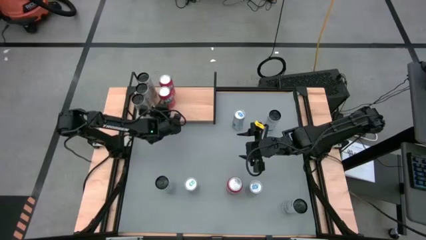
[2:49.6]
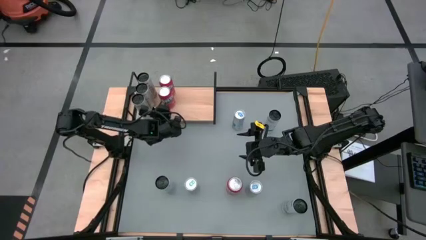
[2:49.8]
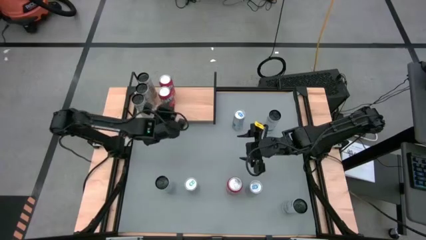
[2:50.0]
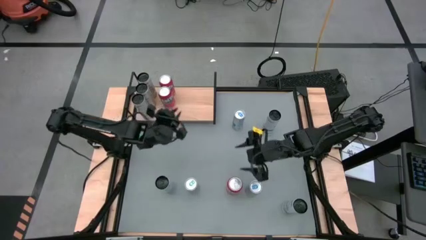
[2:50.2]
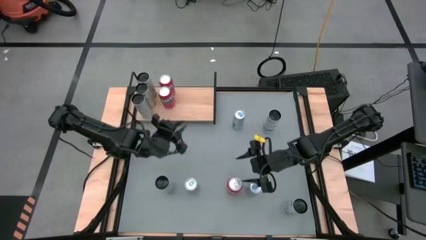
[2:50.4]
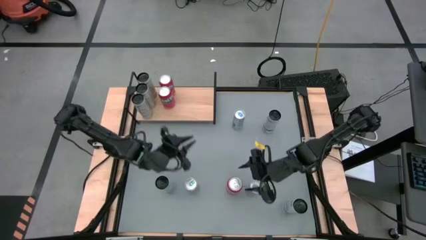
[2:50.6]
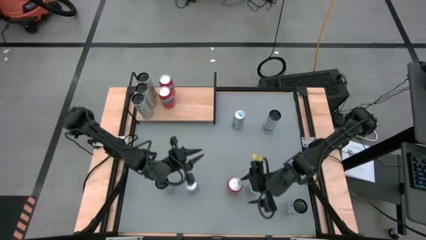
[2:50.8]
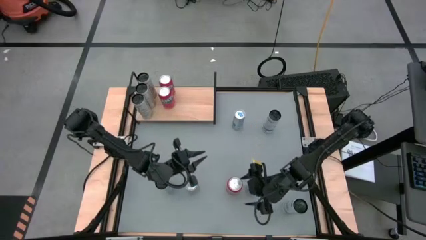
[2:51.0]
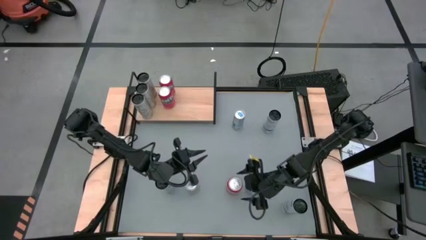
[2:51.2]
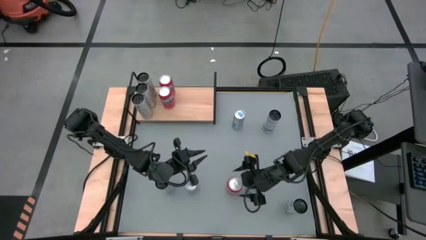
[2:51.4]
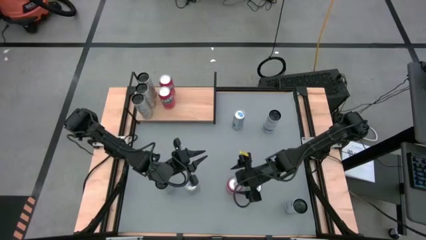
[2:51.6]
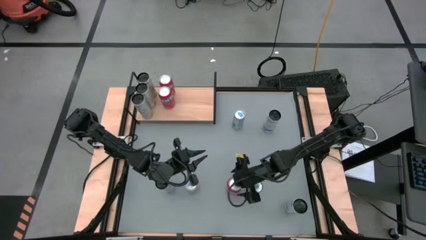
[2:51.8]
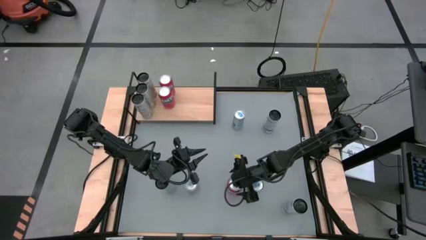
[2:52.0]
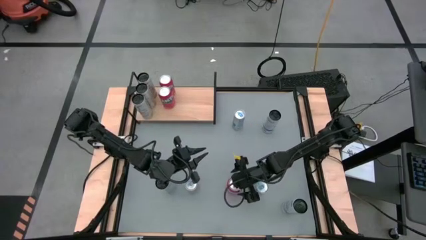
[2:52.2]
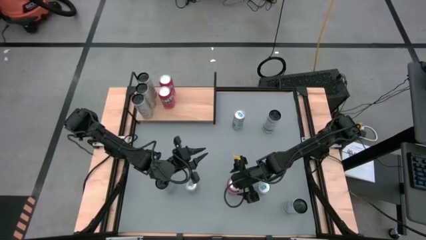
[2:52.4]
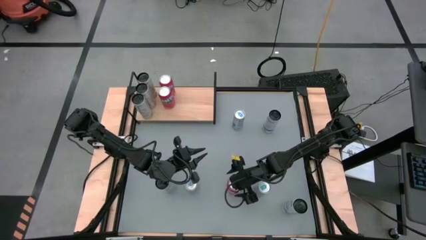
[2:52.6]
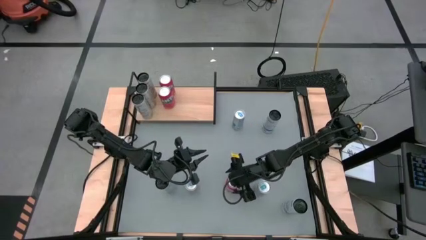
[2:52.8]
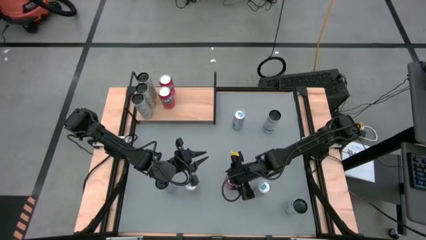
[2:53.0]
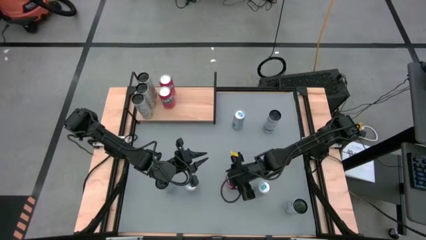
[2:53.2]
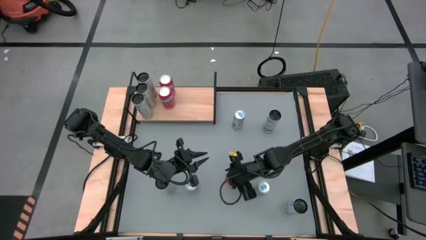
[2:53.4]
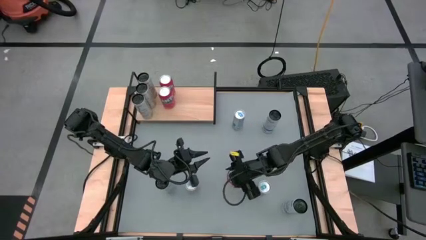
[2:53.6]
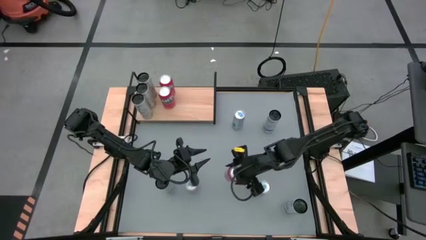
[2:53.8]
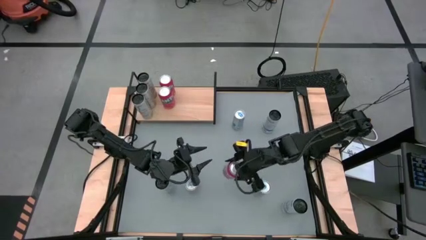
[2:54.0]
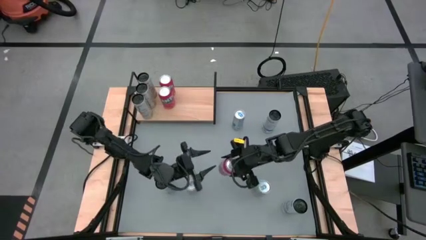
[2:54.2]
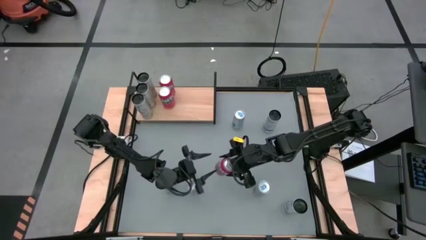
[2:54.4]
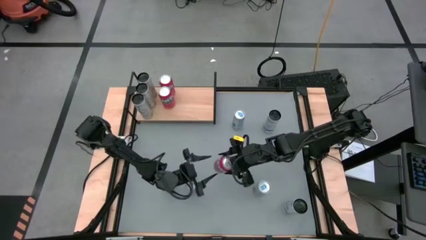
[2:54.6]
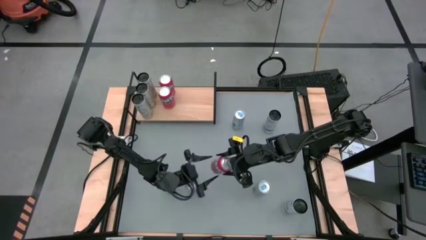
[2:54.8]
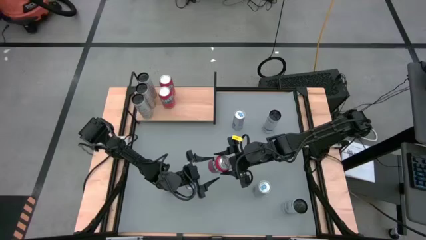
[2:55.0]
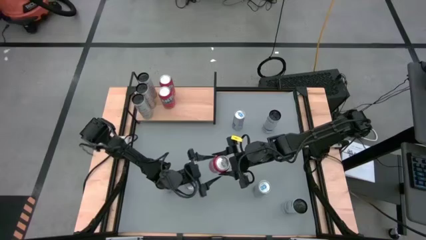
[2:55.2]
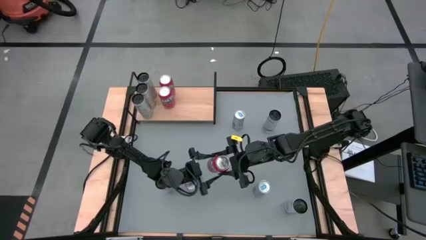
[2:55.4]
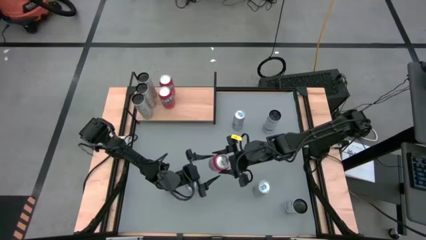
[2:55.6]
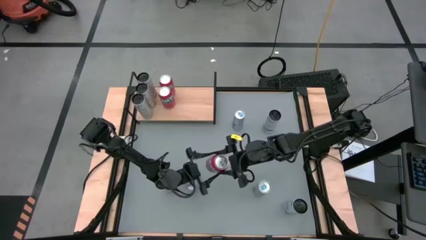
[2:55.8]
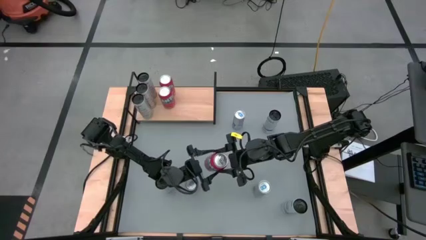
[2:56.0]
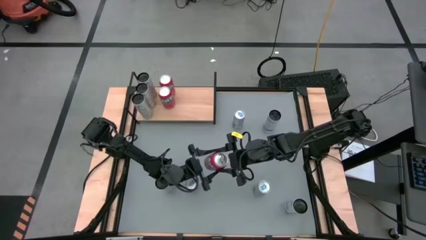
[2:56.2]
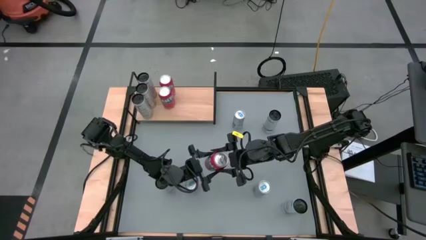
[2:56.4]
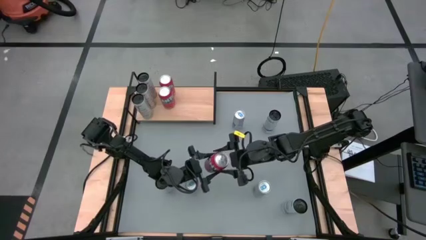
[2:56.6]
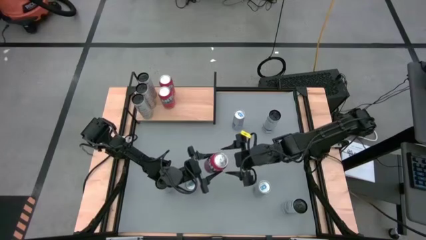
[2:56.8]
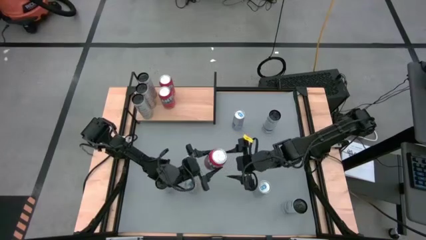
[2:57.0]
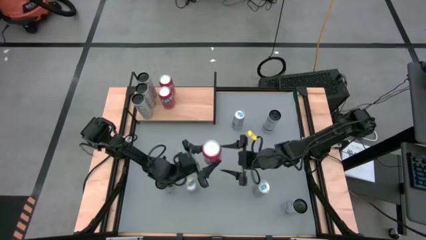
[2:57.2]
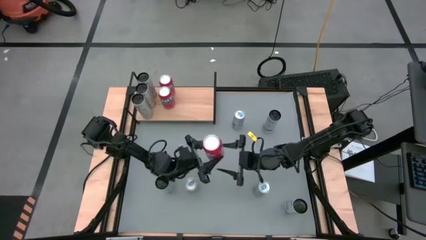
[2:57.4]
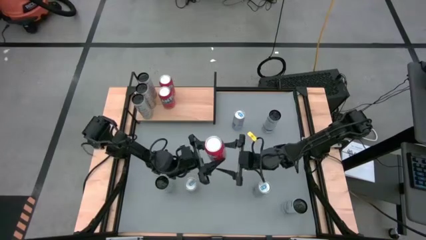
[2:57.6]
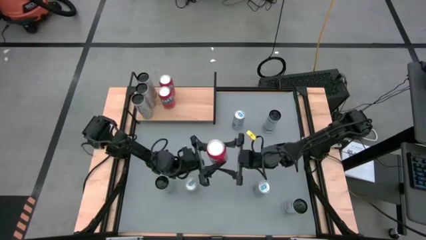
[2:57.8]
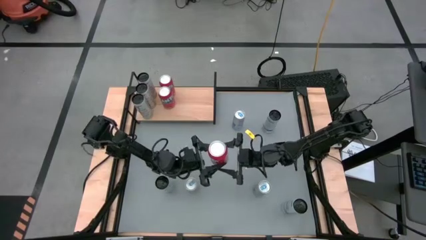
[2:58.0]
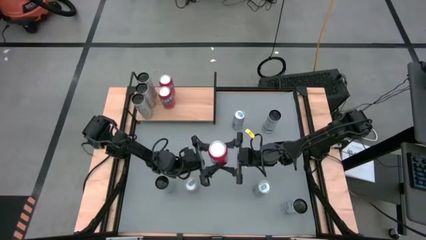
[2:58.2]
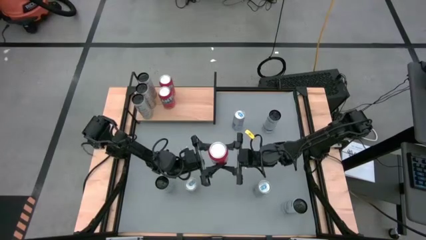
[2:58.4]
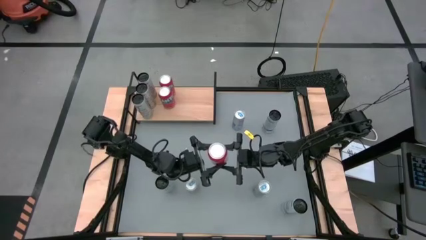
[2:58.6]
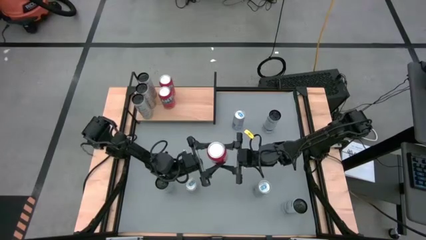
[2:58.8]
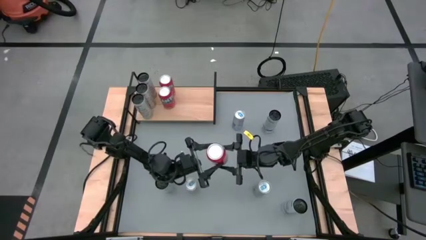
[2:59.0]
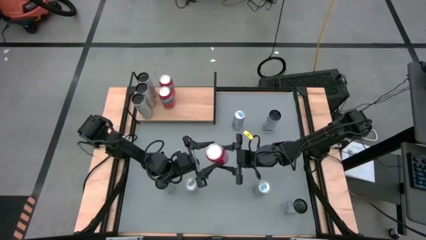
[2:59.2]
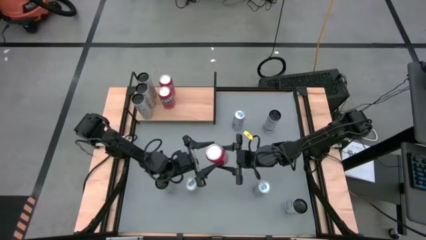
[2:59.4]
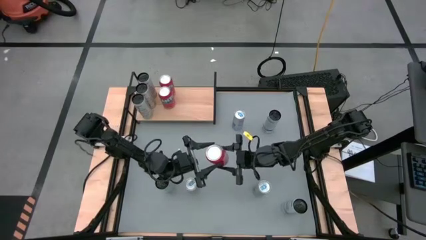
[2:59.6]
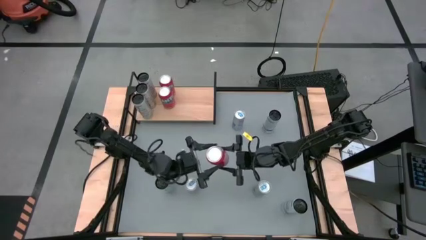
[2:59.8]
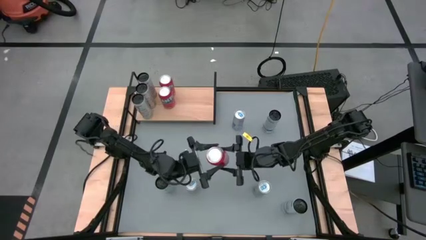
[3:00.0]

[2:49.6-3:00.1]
Task: Place canned beverage on shelf
Put the red soda can on the shelf aligned with the other red soda can

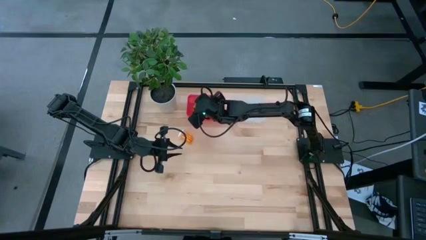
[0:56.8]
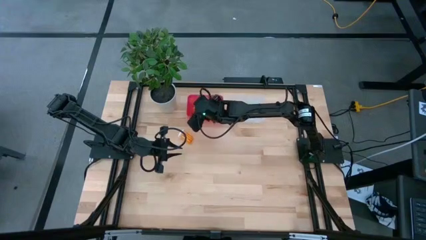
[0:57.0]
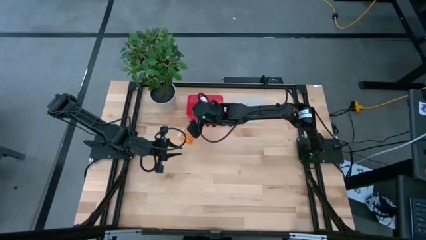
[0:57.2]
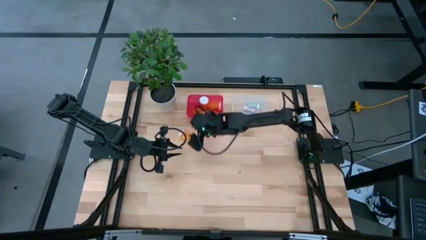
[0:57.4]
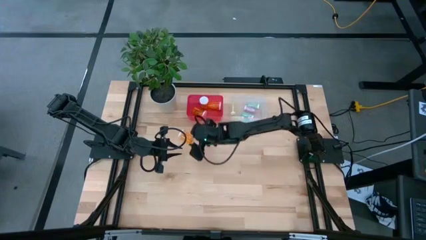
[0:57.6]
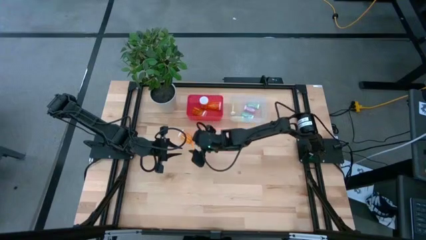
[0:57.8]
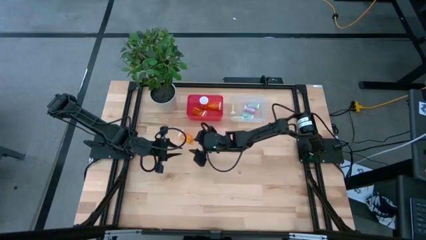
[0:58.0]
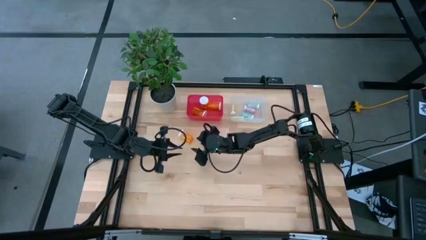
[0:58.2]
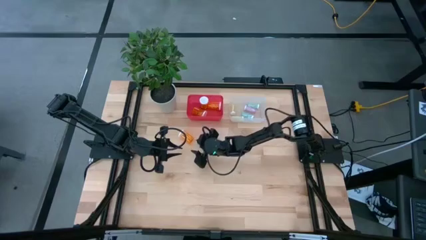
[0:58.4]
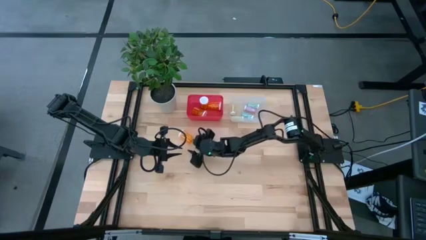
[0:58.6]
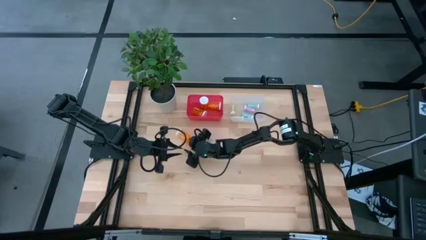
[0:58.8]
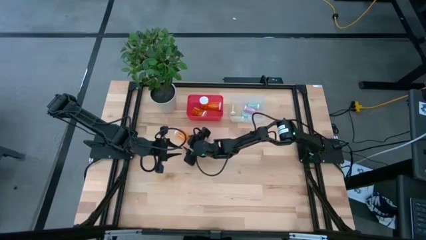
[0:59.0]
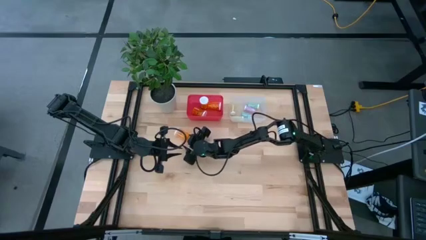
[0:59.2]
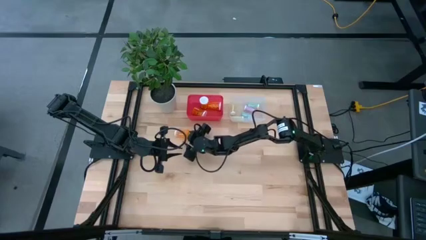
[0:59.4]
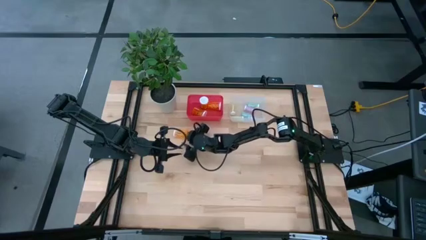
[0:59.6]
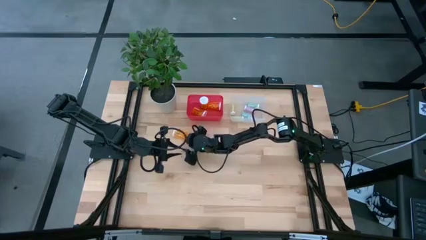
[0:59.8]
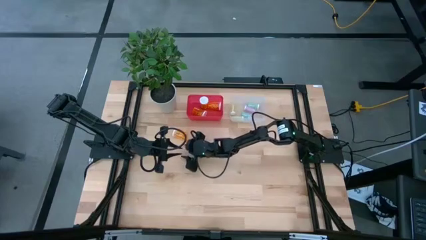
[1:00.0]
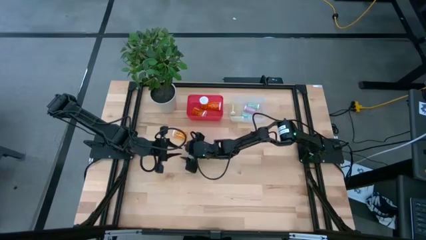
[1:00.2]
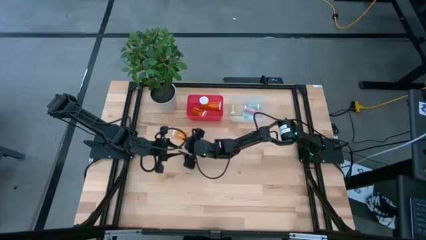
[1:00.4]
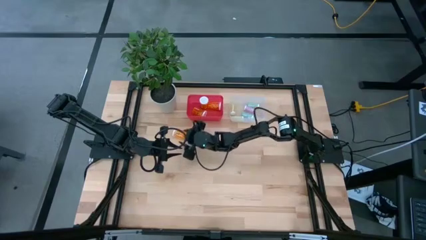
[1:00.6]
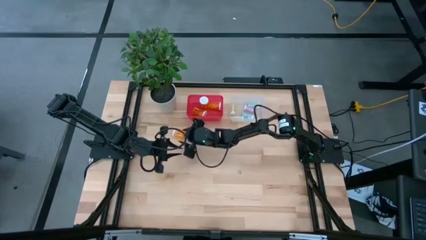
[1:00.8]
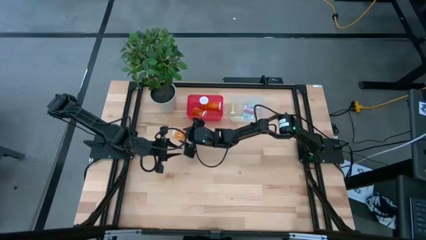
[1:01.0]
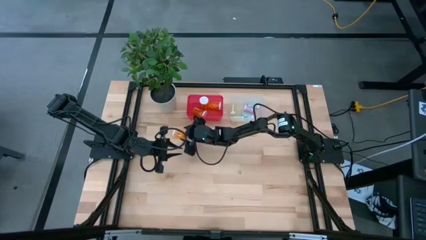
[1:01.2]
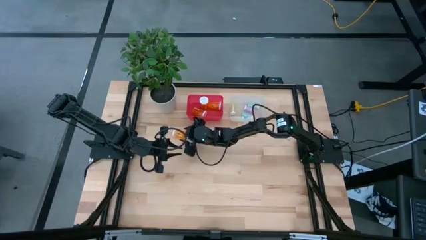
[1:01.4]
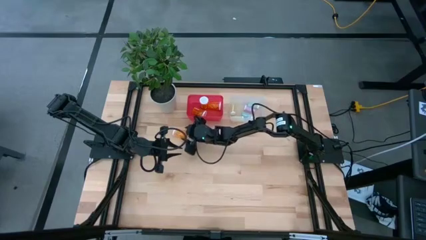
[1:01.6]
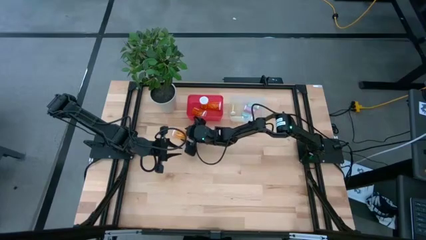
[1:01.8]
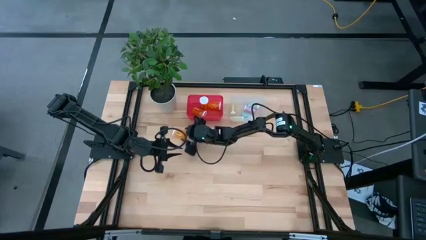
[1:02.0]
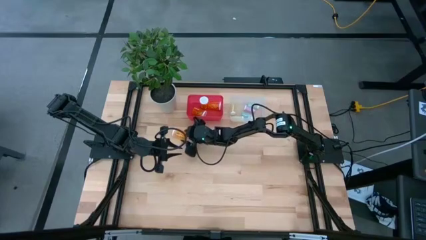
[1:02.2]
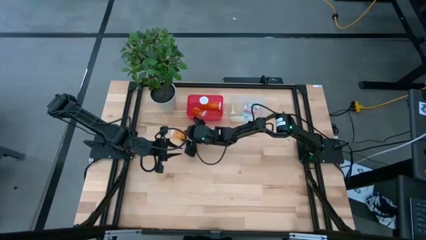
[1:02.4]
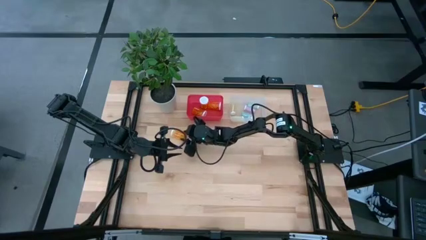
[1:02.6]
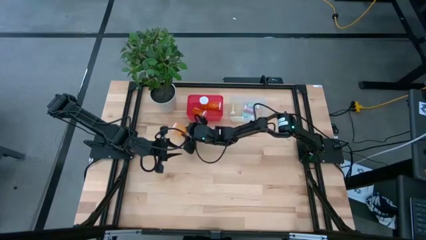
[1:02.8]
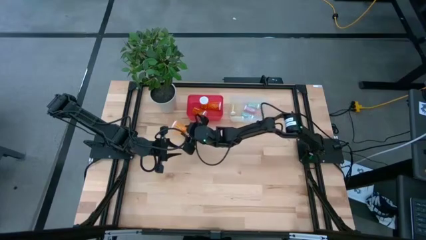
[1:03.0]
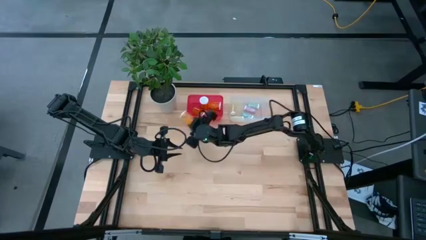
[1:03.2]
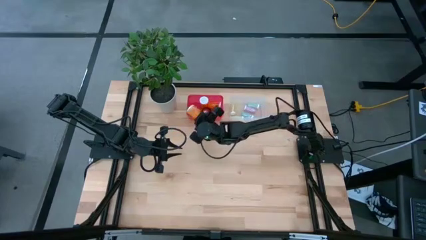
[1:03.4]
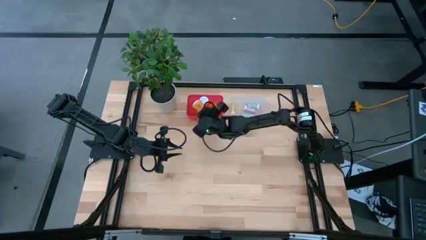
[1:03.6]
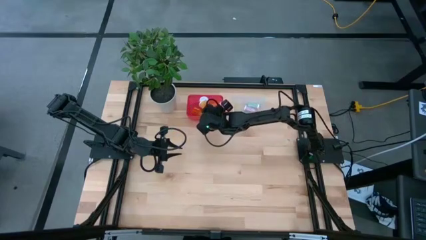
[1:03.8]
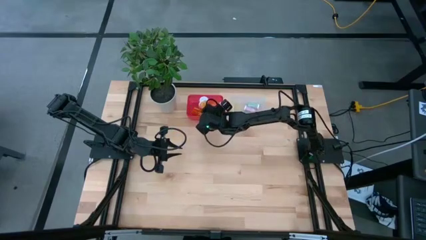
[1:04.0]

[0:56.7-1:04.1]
Task: Pick and place medicine bottles into bin by pill shape (circle, oval)
Put the orange capsule bottle into the red bin
